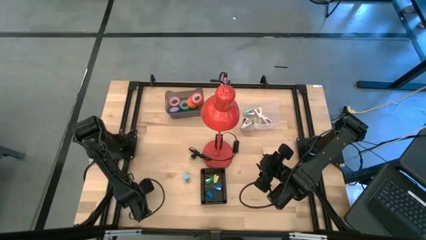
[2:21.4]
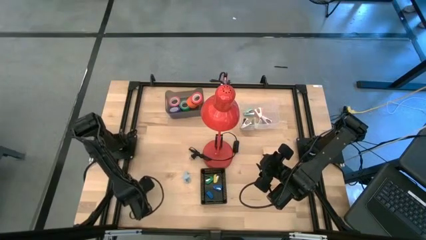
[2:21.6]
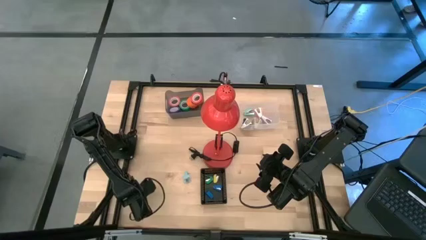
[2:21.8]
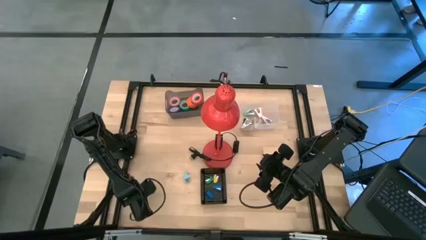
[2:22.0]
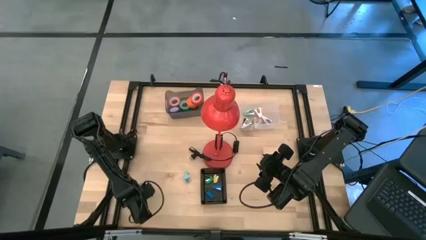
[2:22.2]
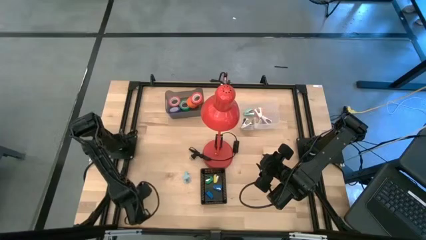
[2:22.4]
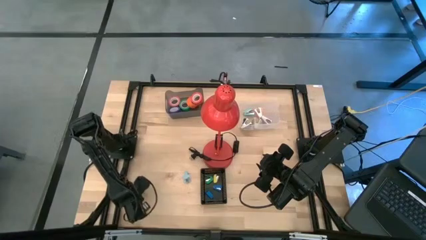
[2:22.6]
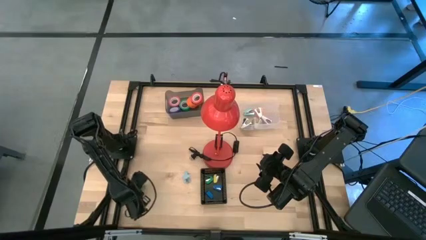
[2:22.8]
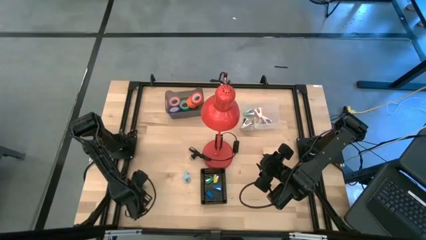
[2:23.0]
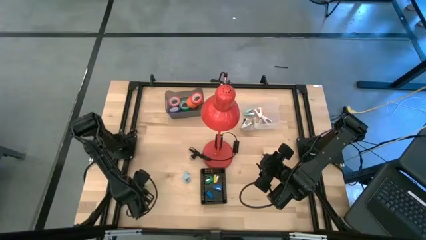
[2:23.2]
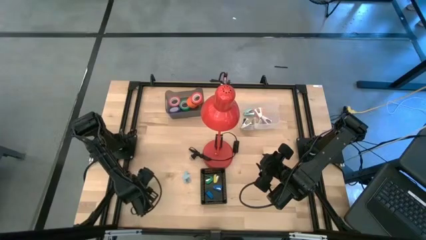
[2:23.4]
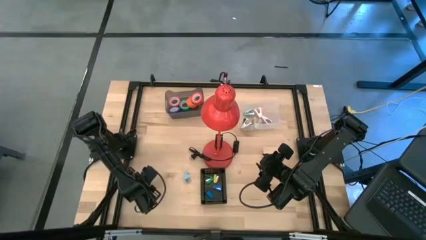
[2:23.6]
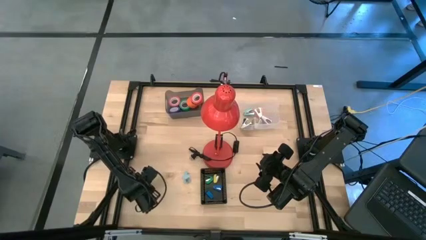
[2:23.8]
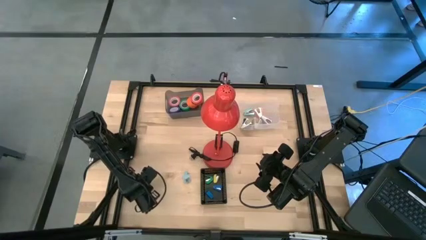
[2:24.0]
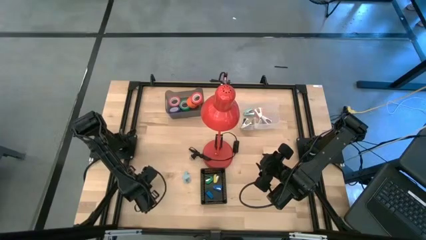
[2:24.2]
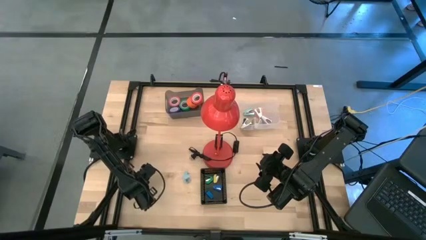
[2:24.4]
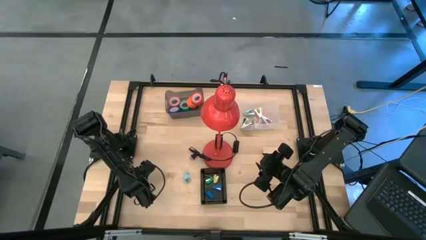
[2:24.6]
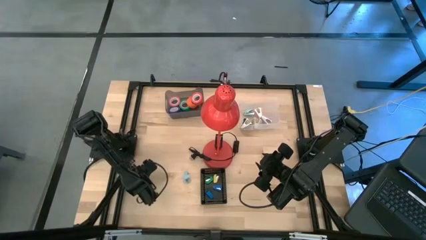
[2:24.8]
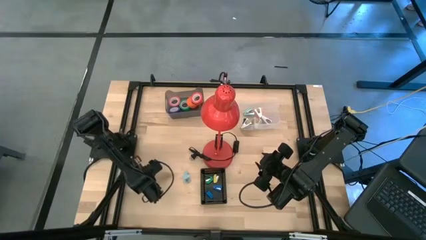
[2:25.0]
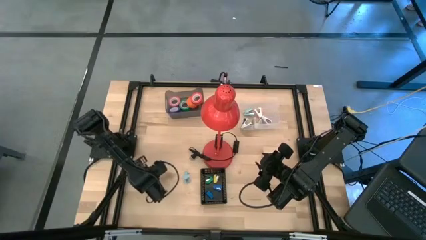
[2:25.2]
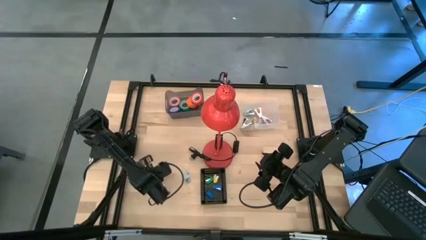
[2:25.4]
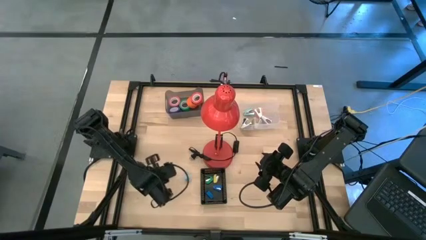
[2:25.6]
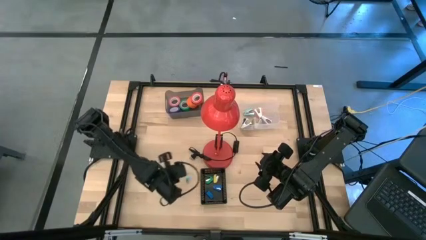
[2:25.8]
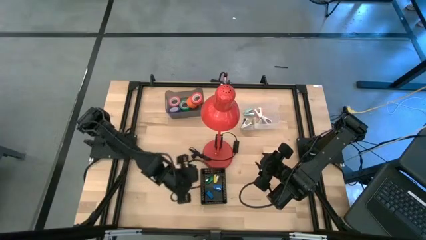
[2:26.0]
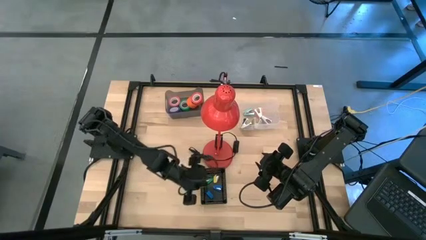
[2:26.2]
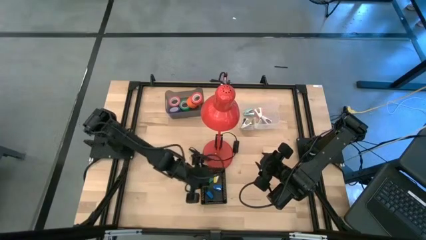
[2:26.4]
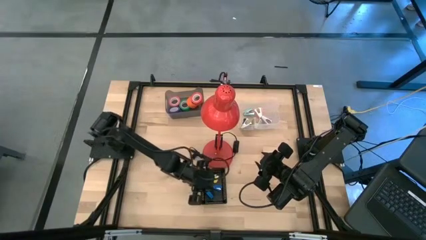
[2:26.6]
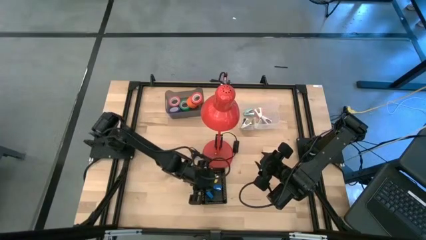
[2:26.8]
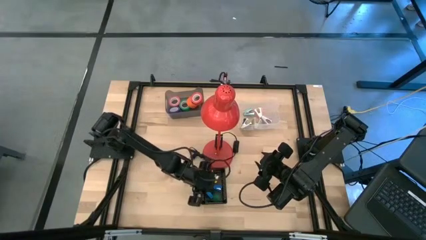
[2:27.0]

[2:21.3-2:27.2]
Task: Pick and place Stapler, Stapler remover, tape
Put the green stapler into the black bin

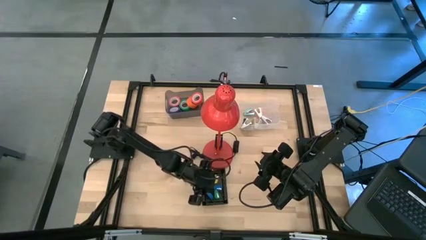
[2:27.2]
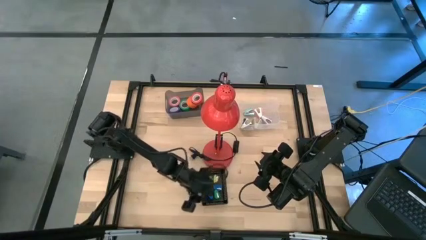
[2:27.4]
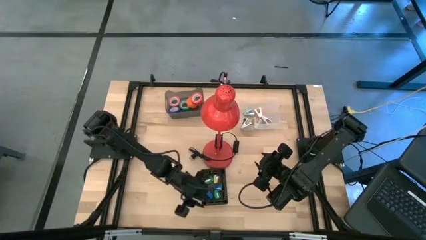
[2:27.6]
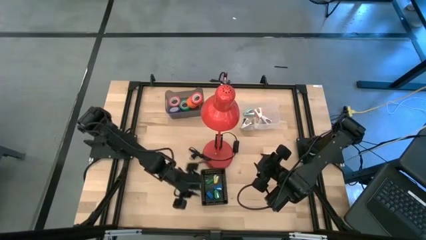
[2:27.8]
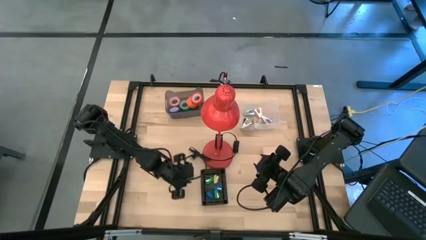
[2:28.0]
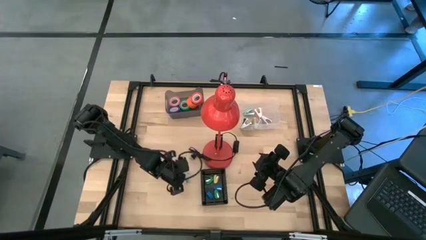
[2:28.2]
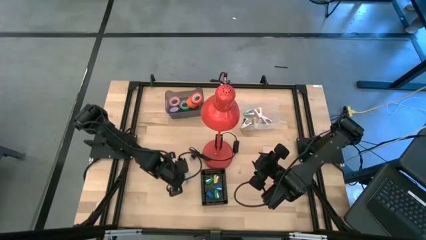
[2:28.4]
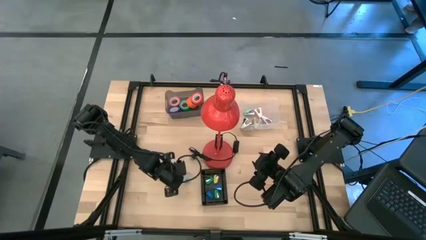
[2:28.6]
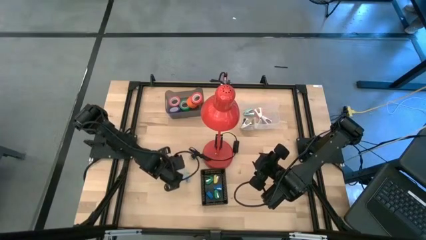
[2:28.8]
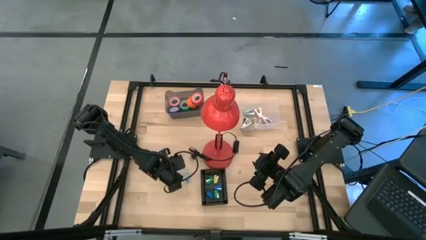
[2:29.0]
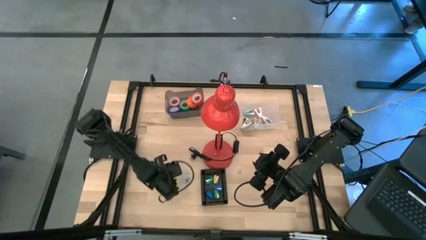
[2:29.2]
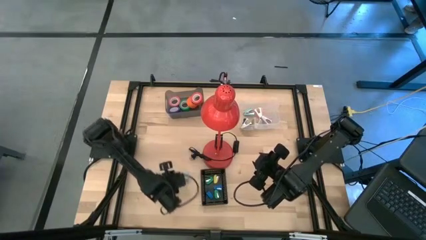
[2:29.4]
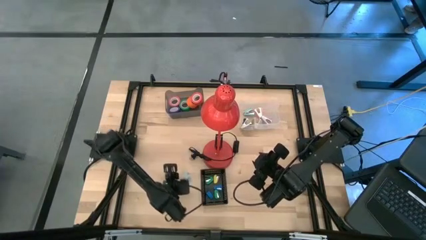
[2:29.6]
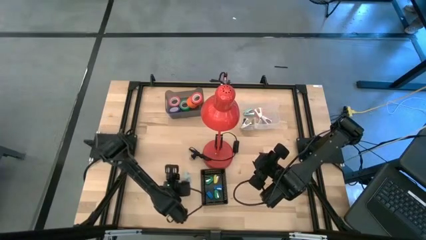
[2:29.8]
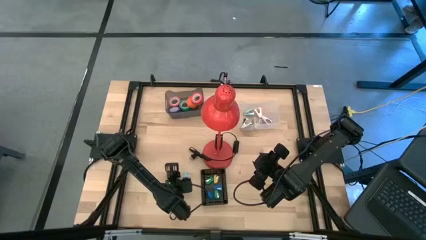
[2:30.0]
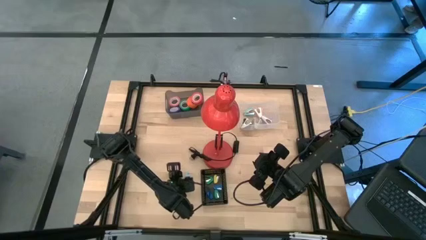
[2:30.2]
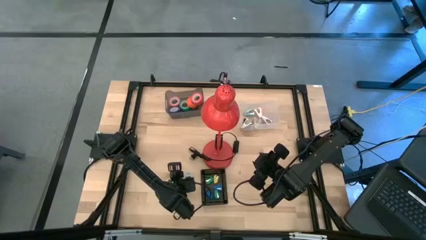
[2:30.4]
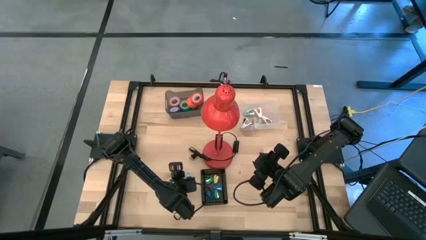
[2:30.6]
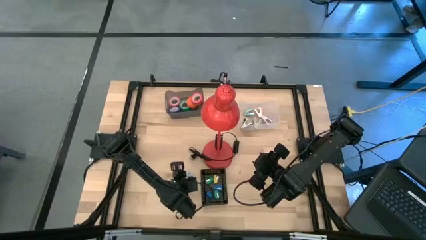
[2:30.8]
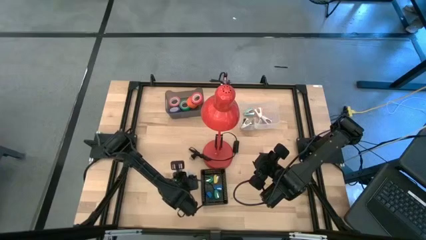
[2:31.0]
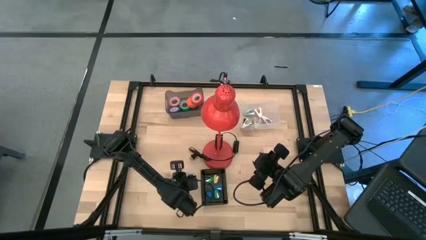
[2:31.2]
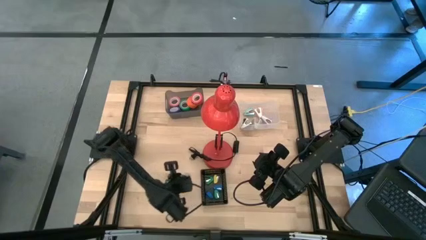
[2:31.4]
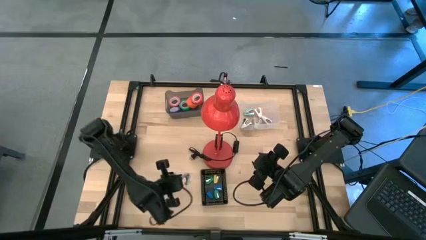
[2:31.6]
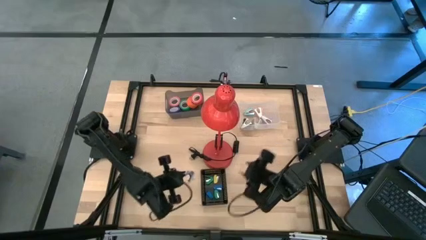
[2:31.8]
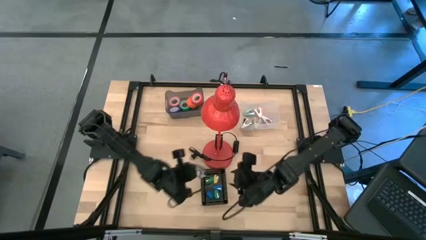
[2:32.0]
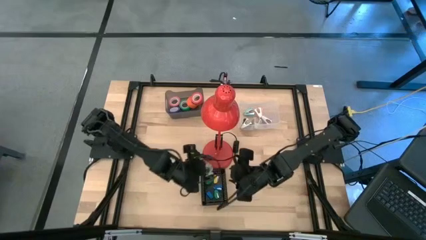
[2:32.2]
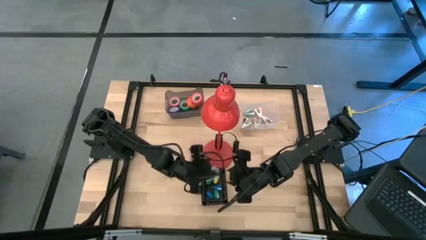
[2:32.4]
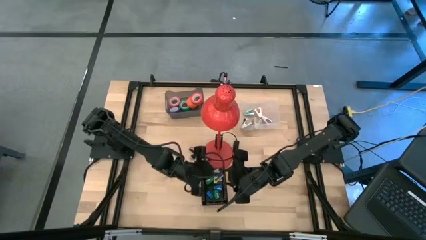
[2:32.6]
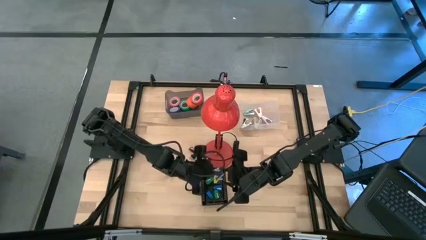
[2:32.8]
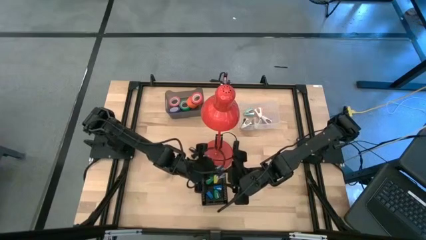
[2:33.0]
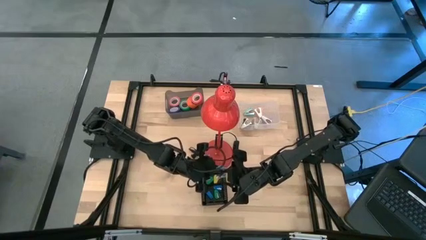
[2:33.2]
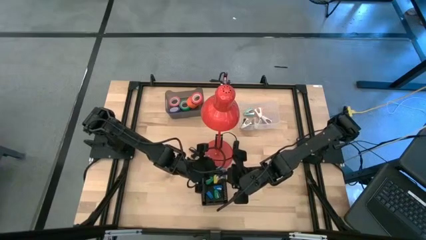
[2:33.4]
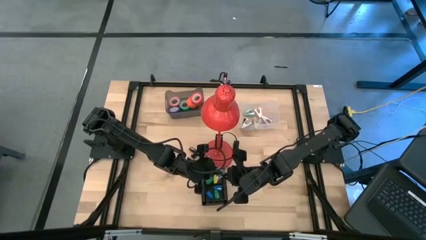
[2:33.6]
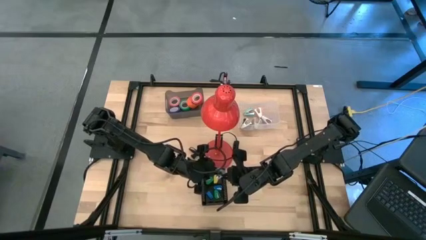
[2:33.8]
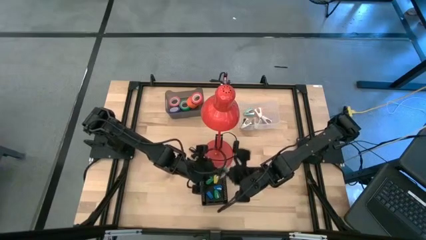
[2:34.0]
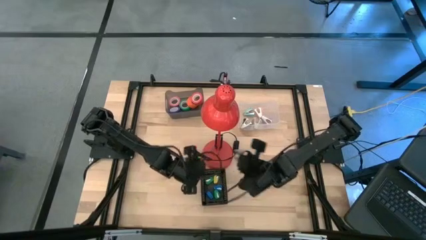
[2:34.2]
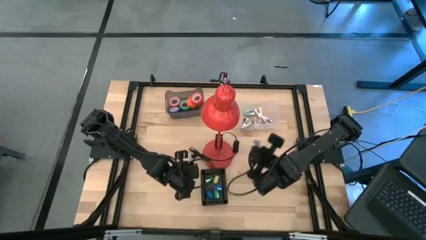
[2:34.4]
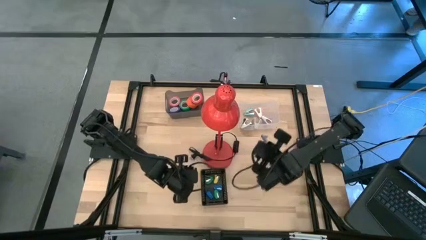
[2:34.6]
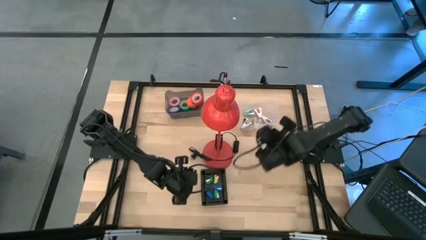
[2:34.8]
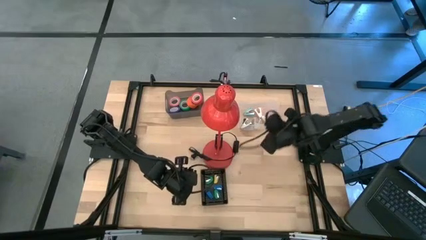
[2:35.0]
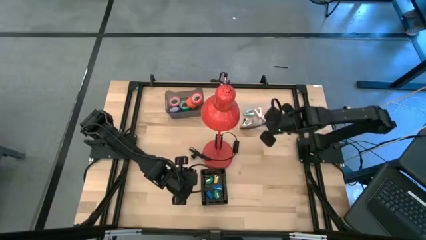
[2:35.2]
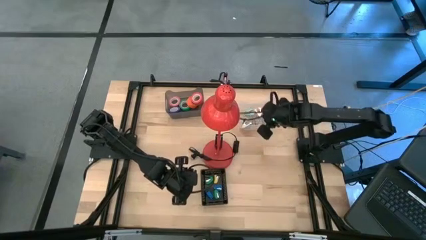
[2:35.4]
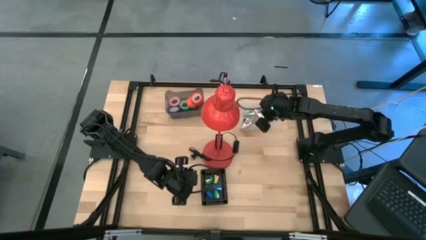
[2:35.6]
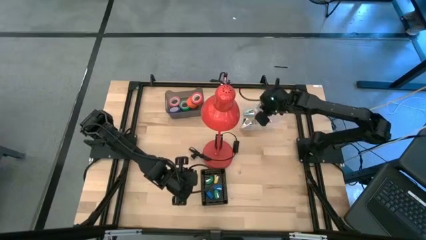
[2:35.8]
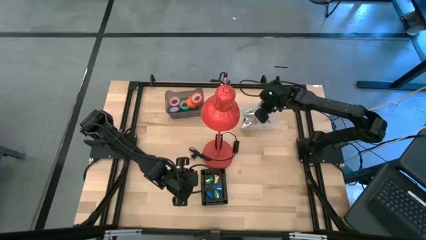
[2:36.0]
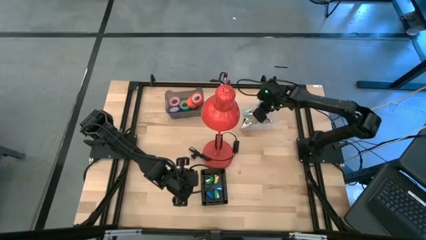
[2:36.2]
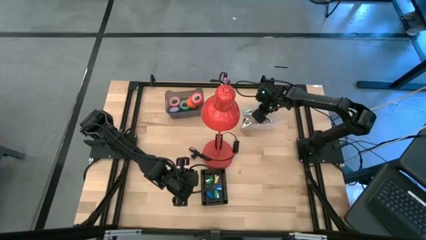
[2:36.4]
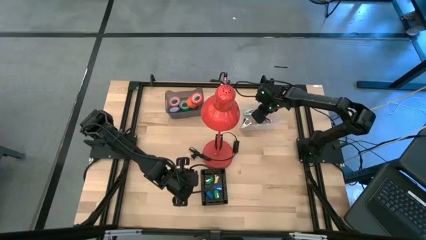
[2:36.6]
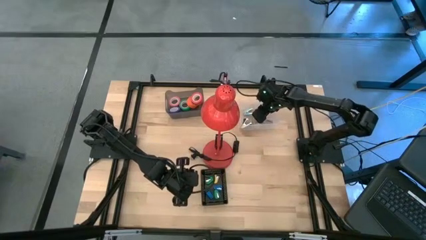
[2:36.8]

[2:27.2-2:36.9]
Put the light blue staple remover into the transparent bin
